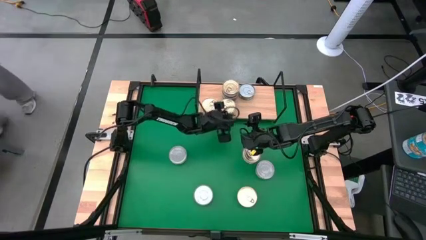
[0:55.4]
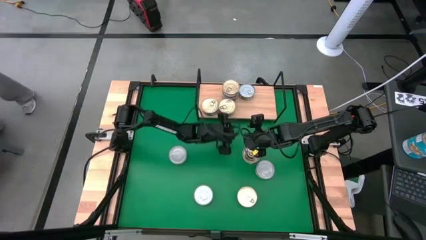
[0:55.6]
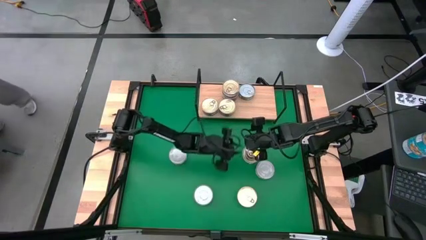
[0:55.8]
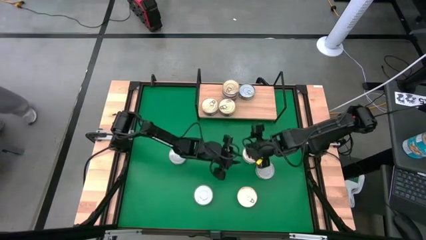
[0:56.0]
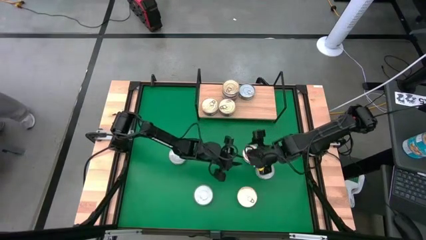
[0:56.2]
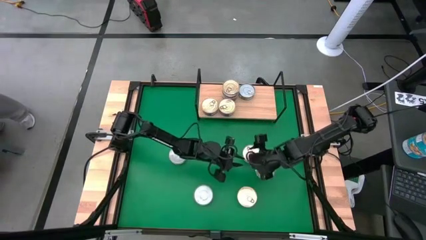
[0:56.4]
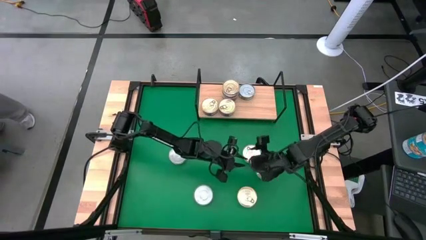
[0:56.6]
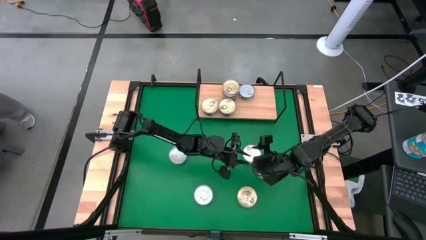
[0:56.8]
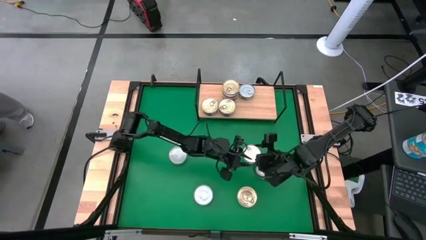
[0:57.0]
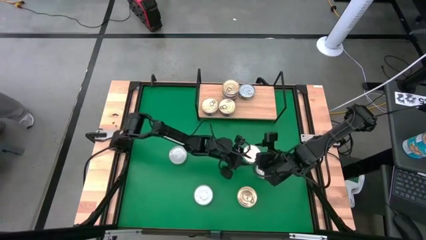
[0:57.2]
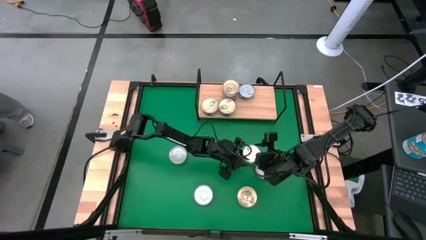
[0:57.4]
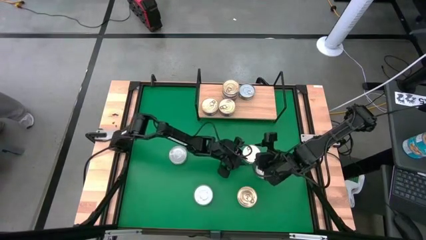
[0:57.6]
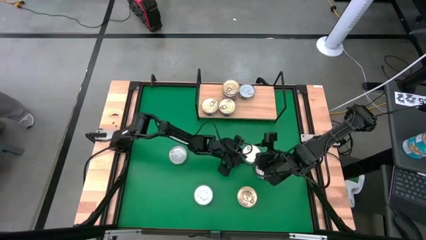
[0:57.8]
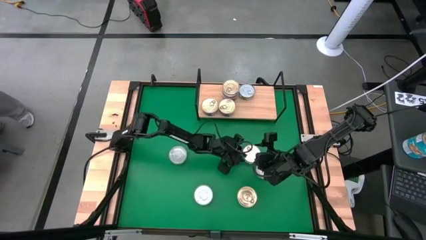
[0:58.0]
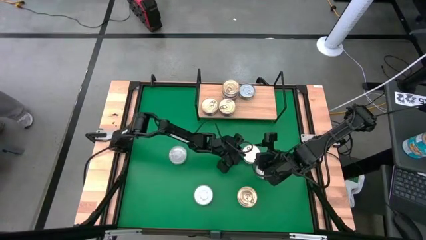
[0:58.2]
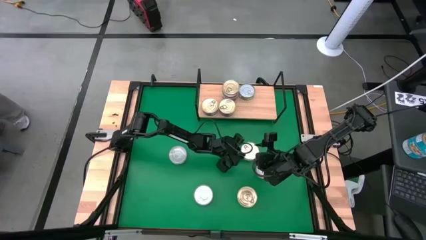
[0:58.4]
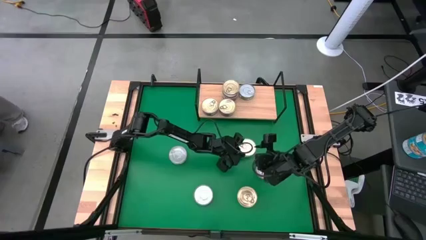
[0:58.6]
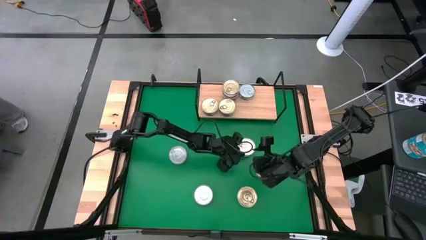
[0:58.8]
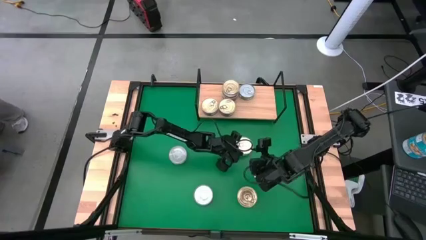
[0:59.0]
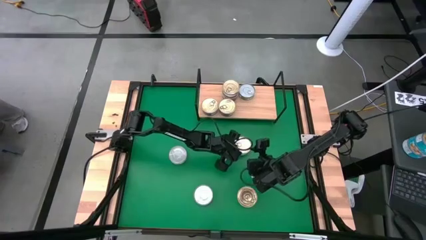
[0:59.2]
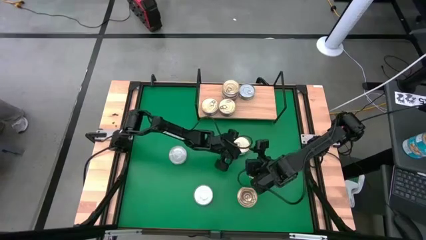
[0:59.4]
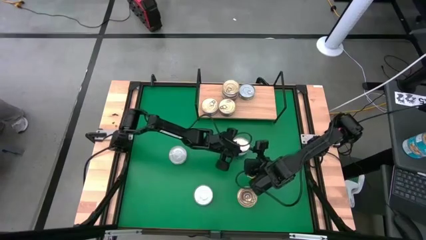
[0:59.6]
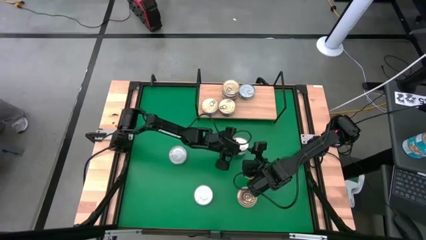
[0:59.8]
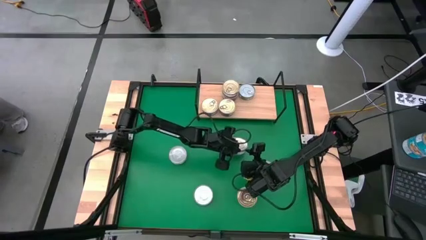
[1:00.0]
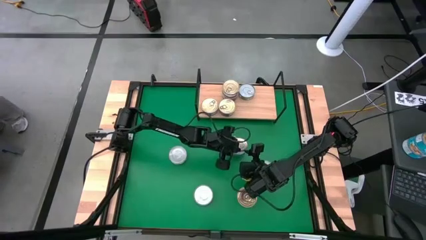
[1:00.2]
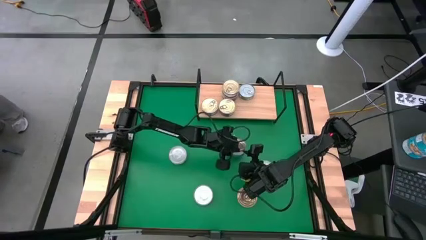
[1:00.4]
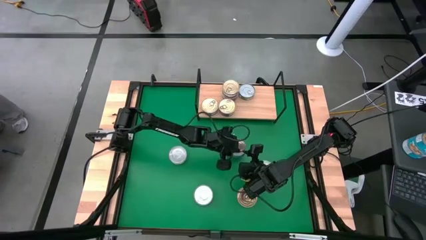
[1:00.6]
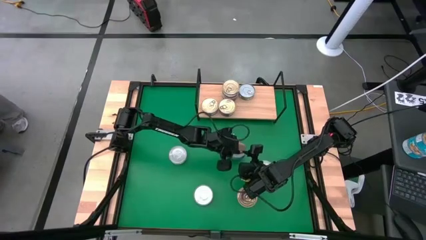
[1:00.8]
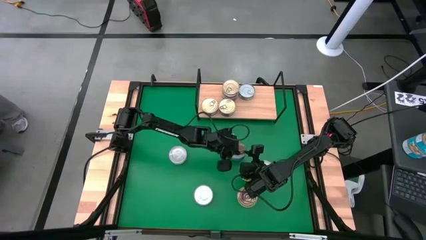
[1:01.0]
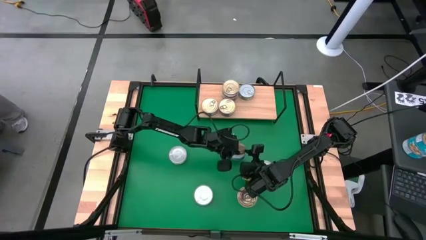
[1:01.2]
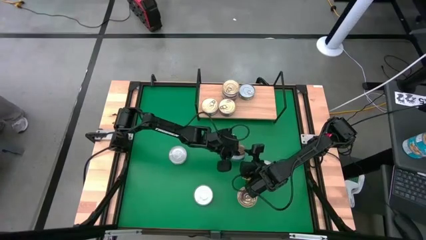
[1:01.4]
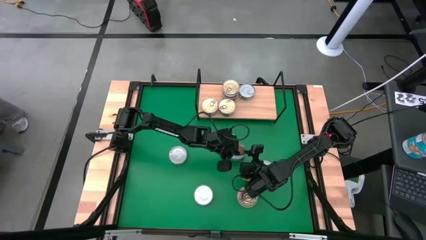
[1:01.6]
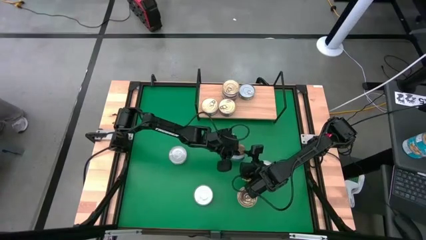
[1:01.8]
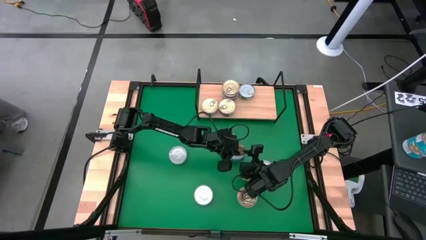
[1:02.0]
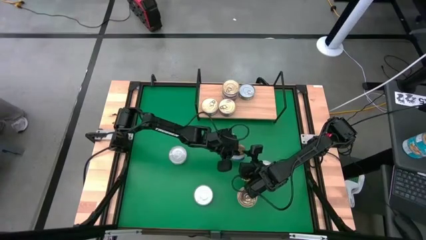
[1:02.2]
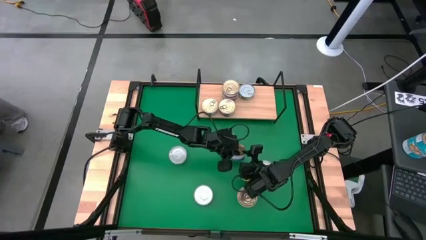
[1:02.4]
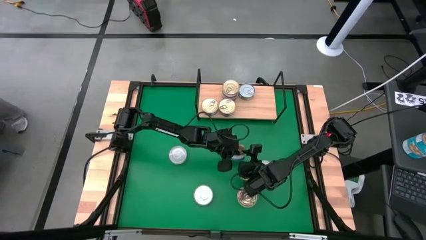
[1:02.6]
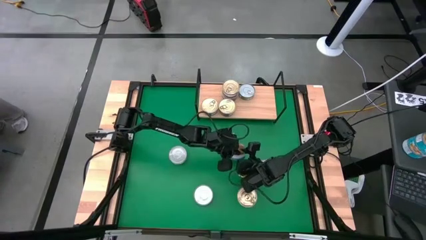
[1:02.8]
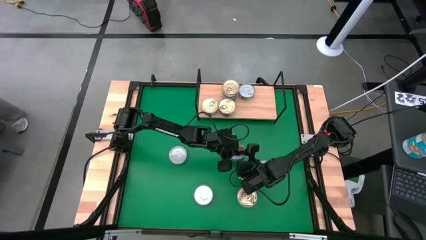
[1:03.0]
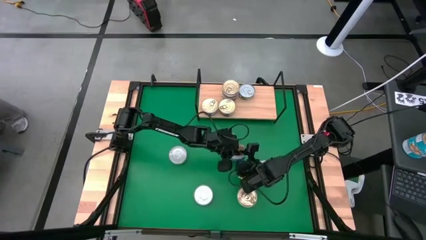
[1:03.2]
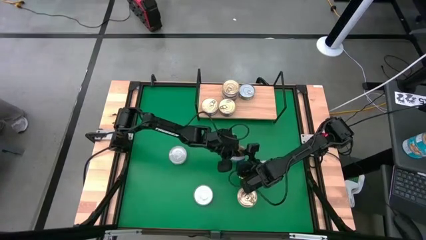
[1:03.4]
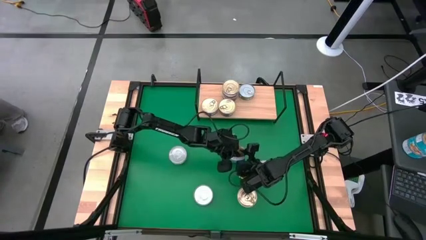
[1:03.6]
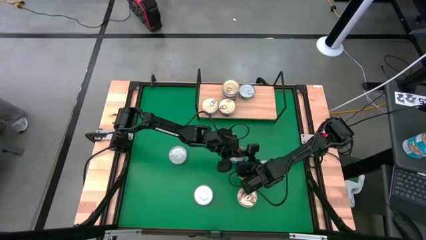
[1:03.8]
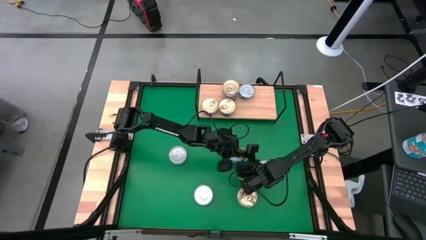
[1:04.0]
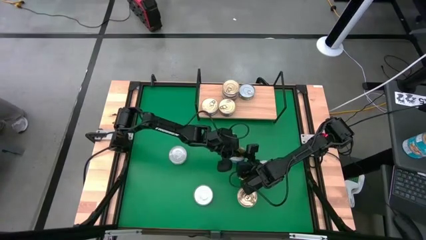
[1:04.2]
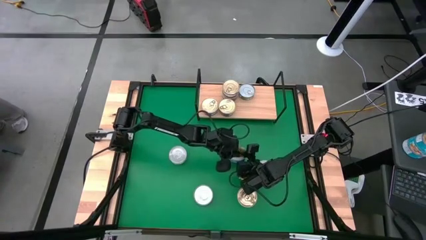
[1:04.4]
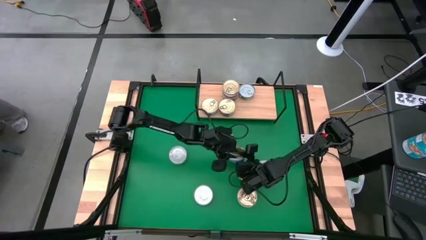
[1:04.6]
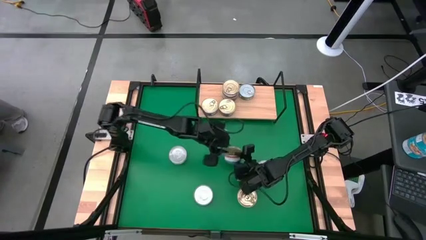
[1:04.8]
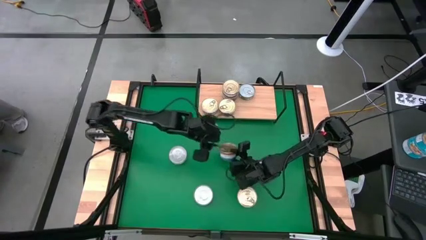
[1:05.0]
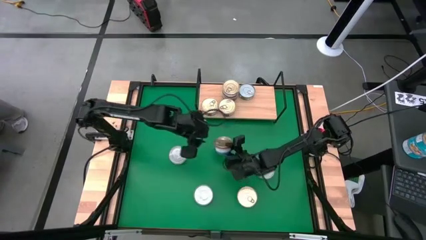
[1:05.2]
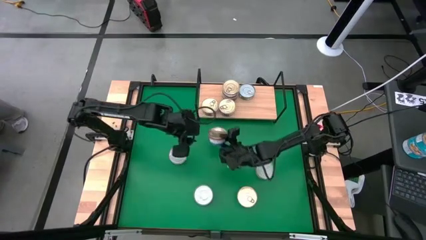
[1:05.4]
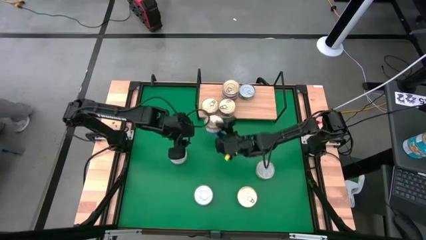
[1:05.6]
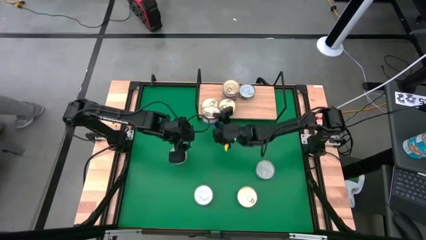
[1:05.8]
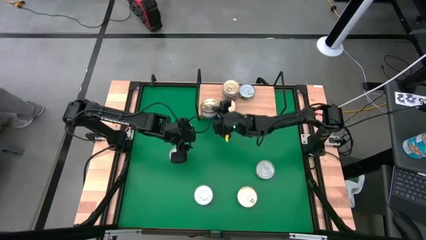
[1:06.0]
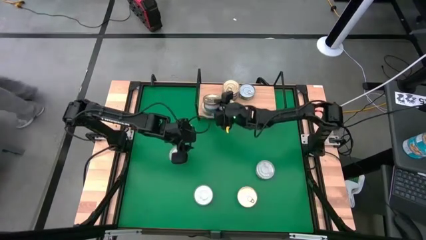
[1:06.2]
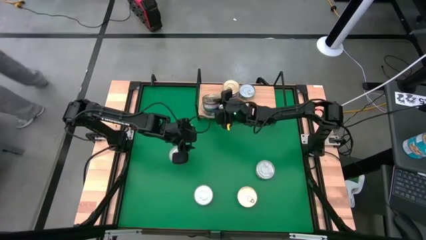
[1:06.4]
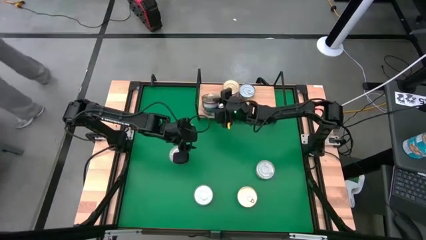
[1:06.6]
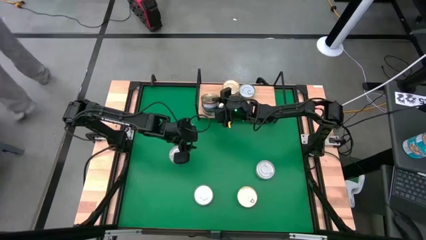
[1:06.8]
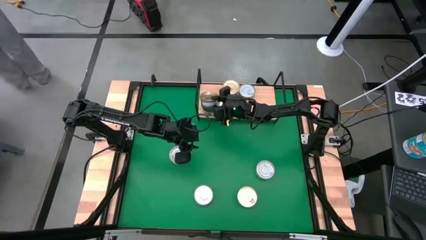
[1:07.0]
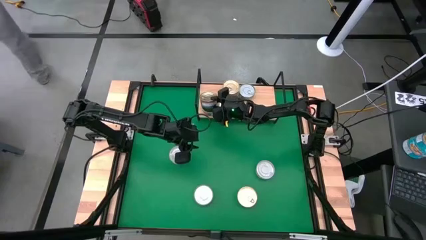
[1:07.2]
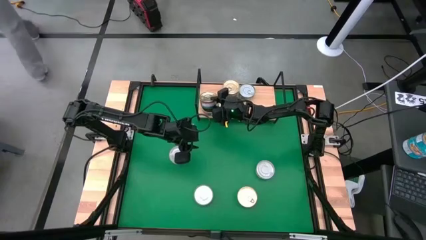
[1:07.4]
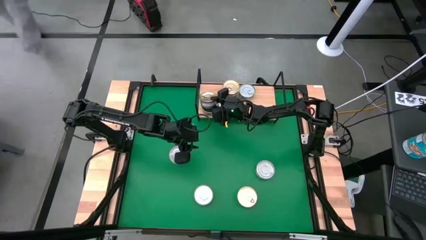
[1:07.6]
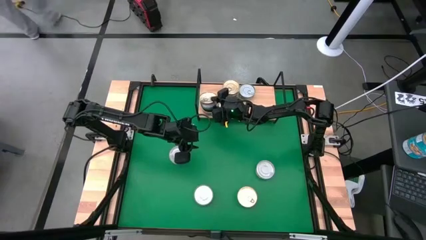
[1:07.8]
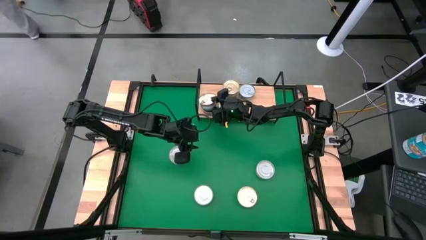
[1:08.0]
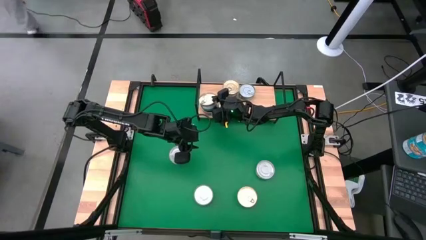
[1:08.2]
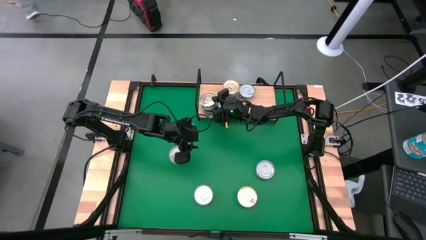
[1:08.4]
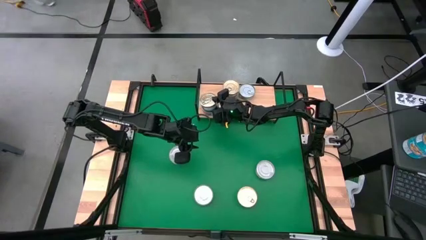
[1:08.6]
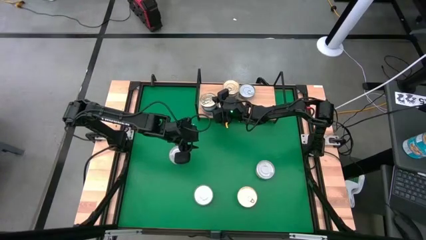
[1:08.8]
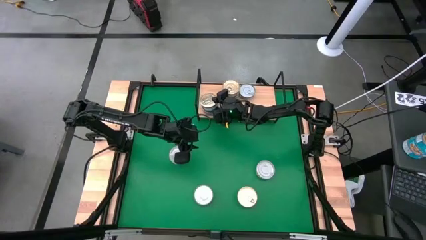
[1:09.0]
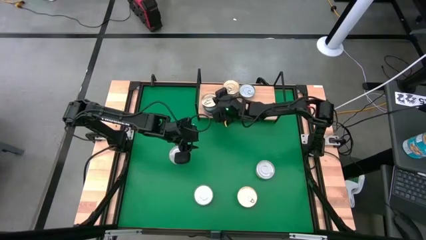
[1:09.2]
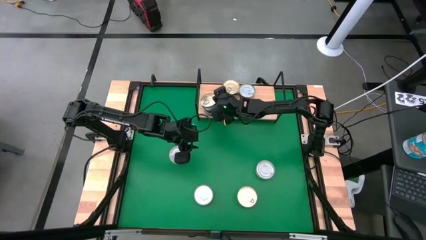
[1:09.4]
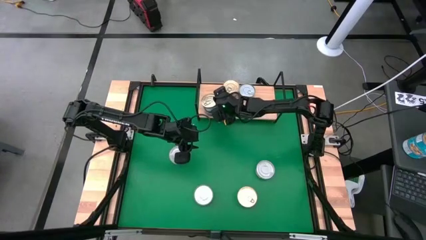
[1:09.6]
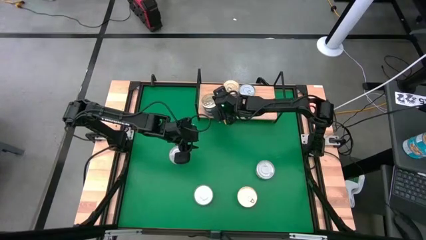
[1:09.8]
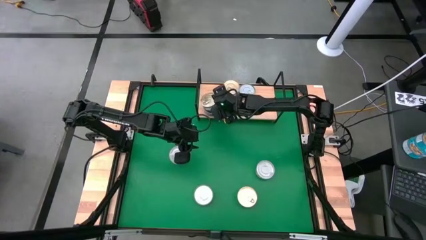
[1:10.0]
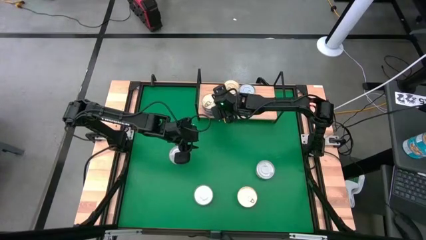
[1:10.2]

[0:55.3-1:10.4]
Task: Stack canned seafood by type on shelf
Stack the blue tuna can on top of the blue can on the shelf
